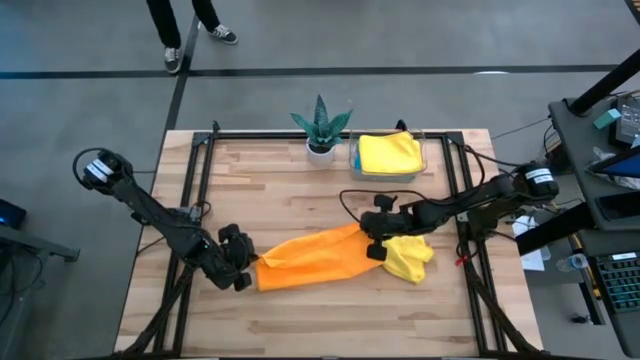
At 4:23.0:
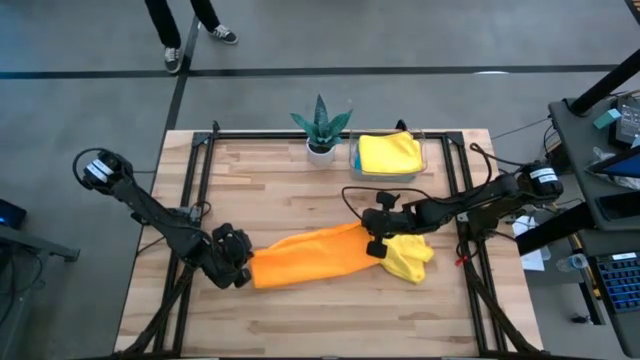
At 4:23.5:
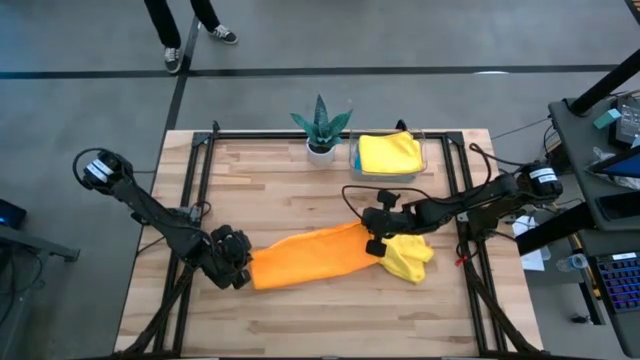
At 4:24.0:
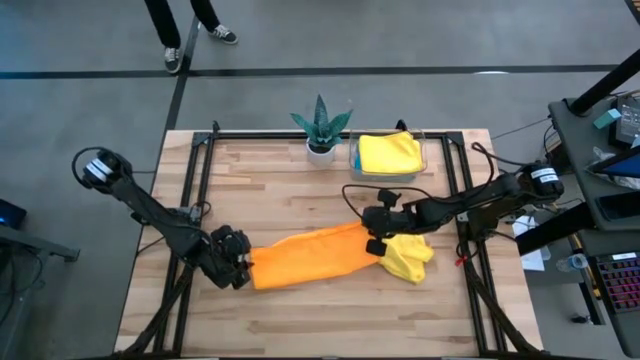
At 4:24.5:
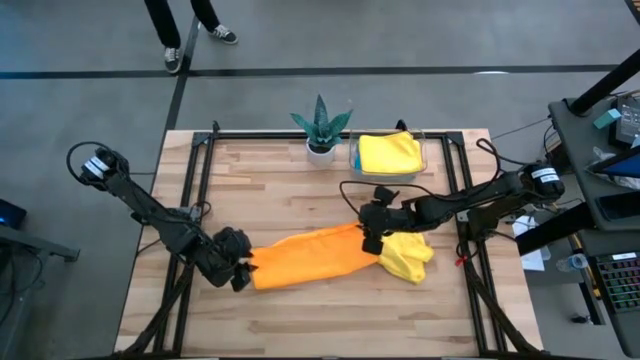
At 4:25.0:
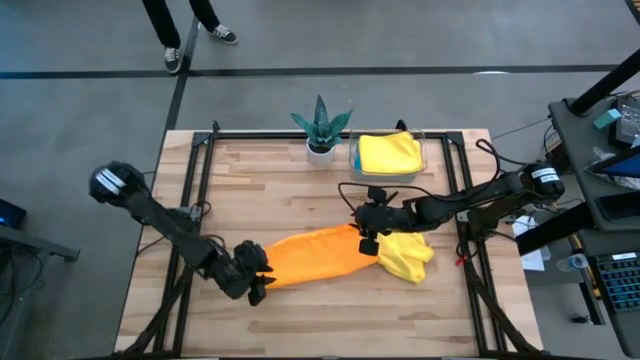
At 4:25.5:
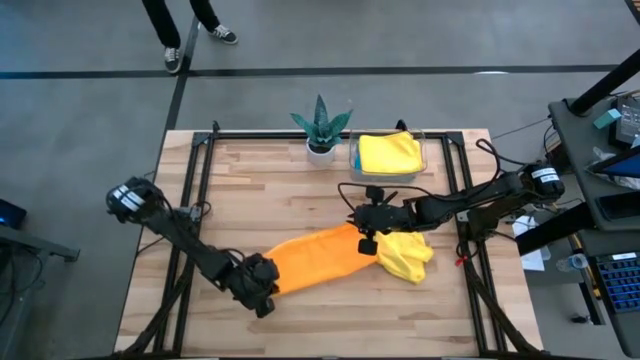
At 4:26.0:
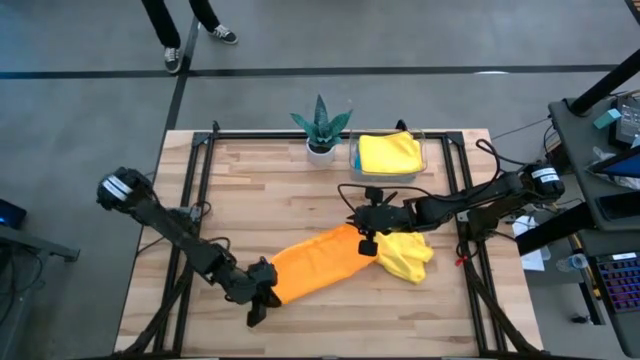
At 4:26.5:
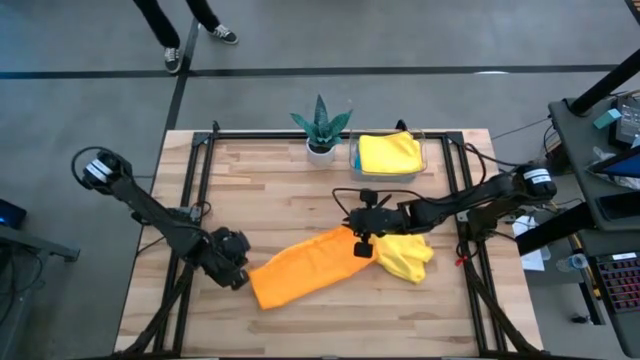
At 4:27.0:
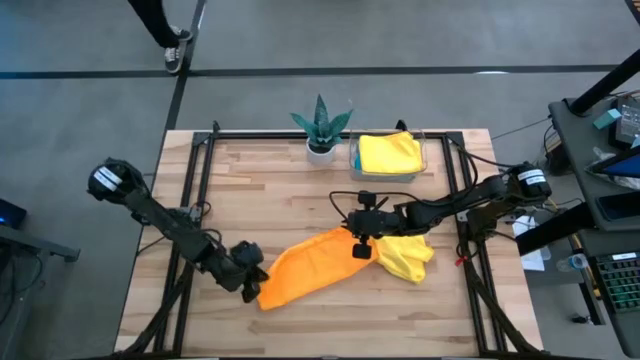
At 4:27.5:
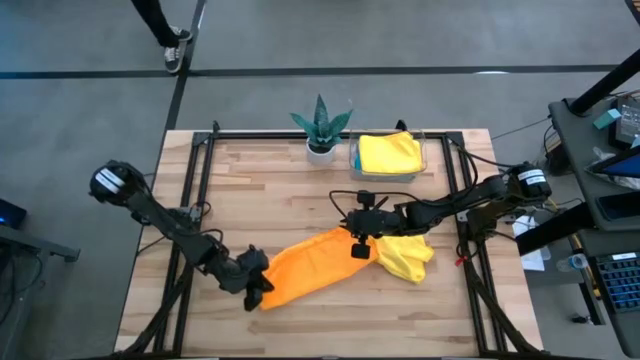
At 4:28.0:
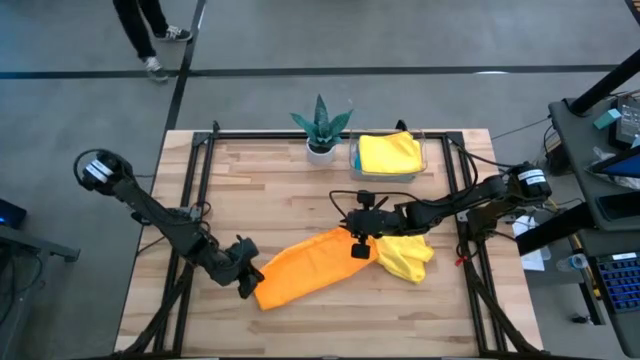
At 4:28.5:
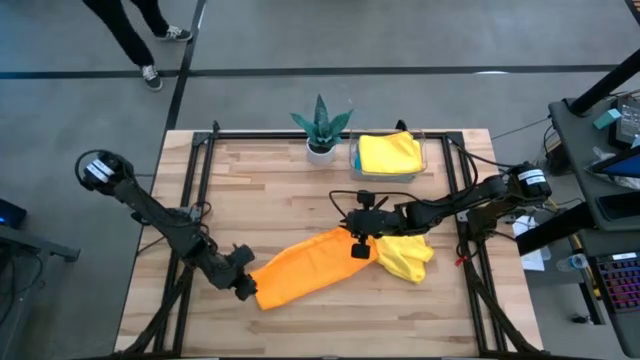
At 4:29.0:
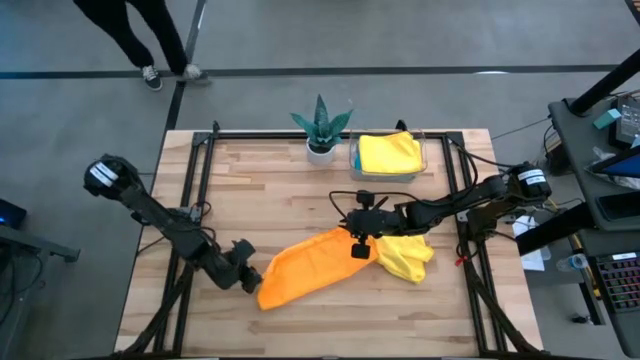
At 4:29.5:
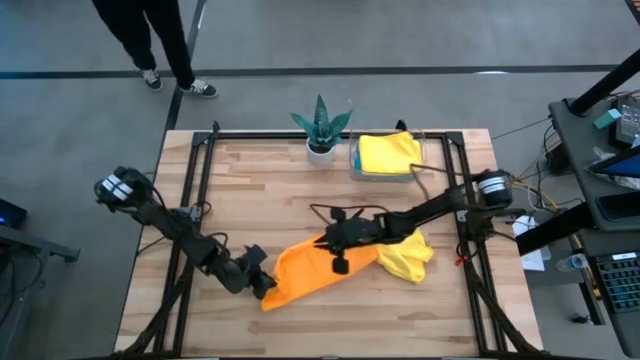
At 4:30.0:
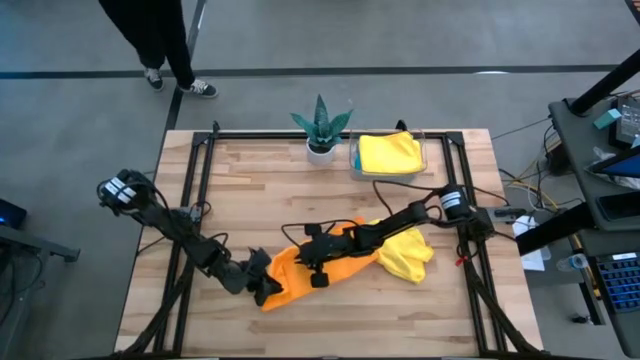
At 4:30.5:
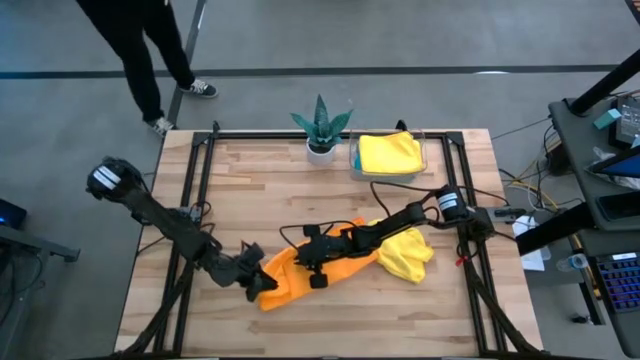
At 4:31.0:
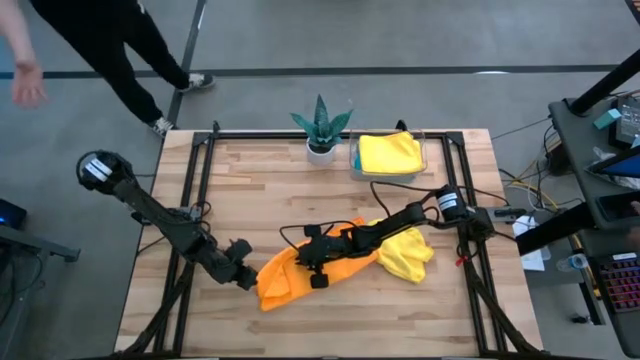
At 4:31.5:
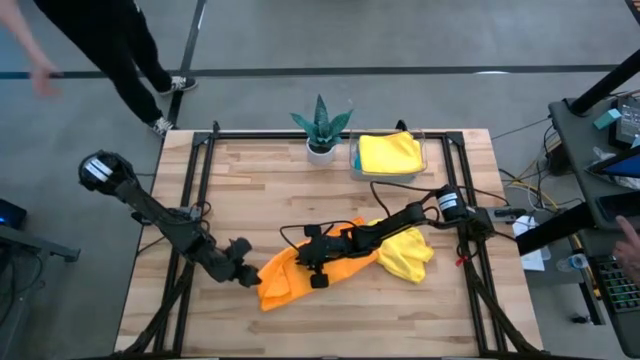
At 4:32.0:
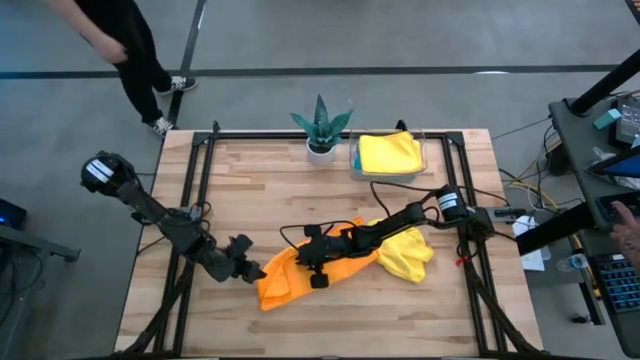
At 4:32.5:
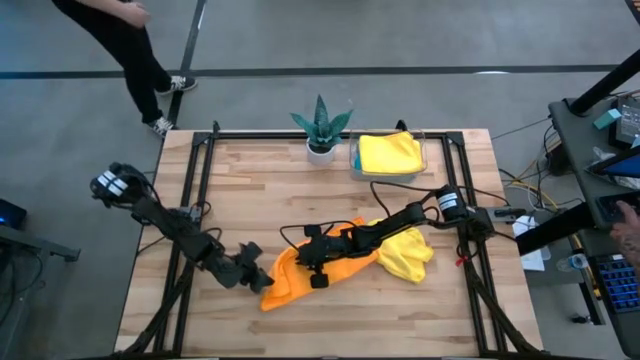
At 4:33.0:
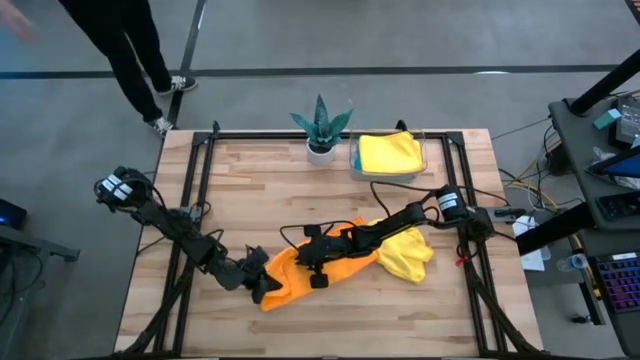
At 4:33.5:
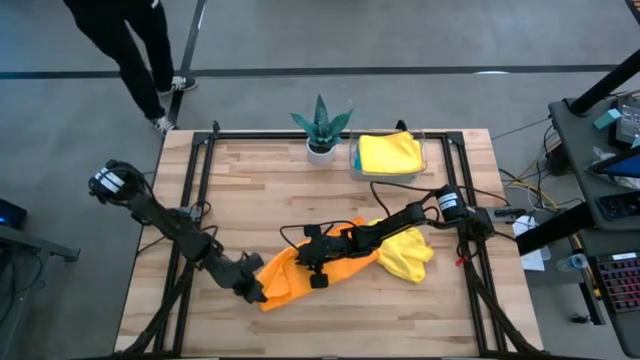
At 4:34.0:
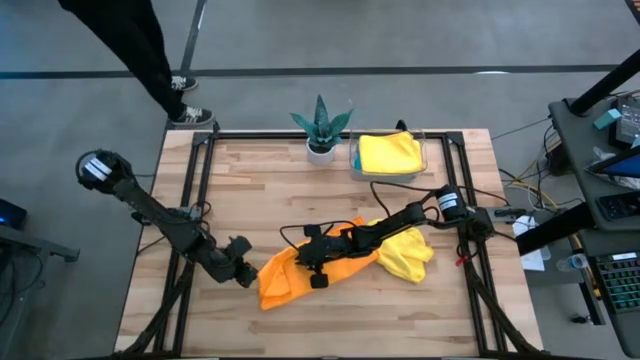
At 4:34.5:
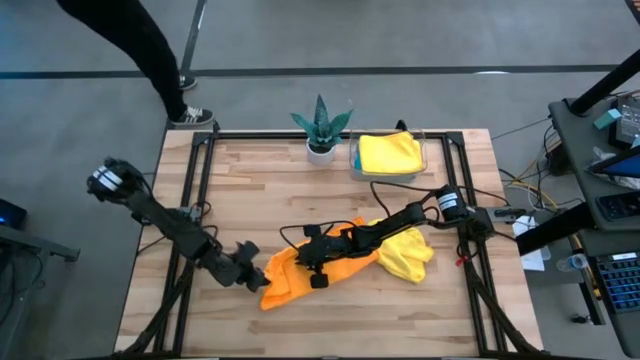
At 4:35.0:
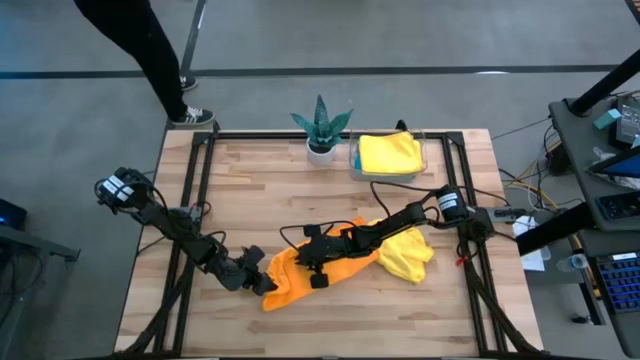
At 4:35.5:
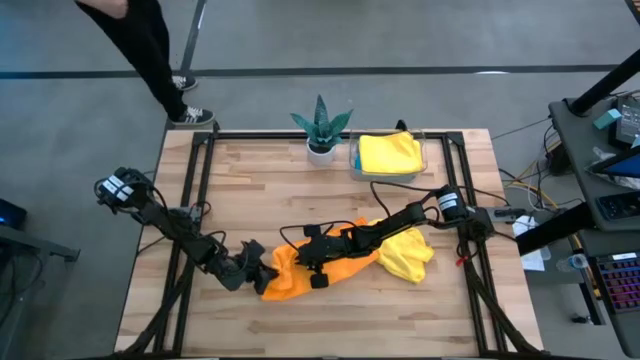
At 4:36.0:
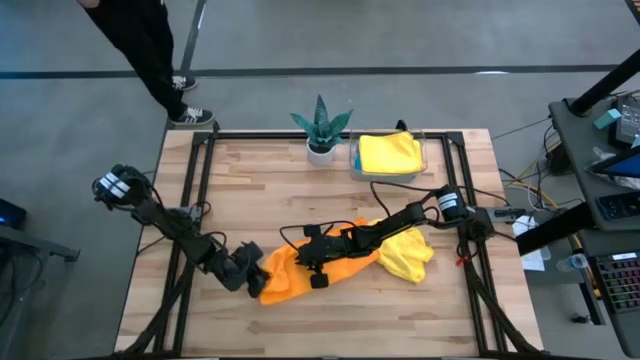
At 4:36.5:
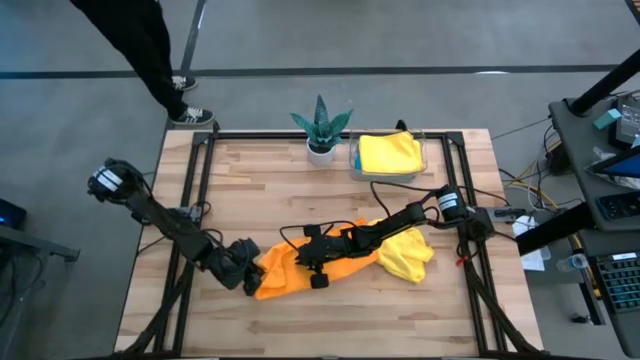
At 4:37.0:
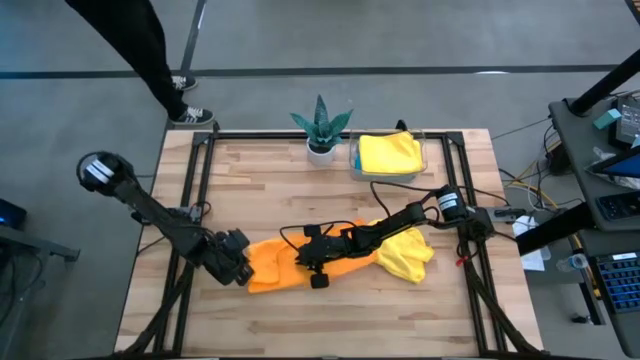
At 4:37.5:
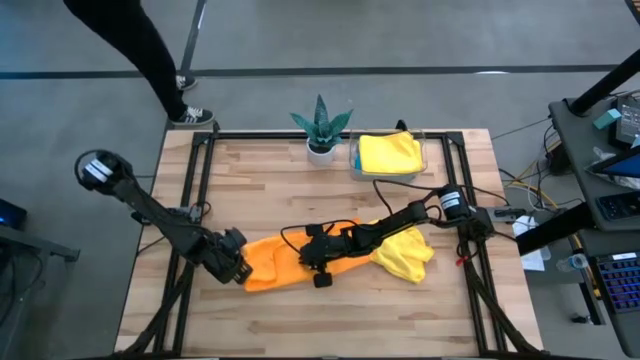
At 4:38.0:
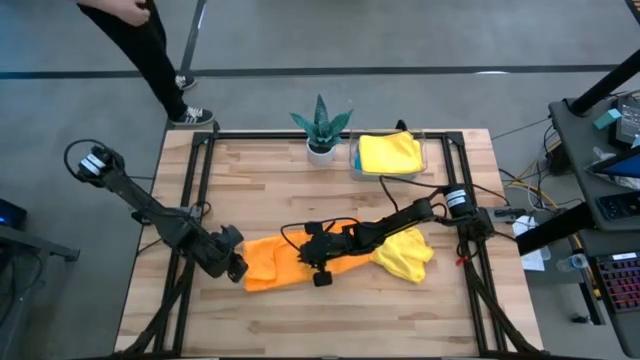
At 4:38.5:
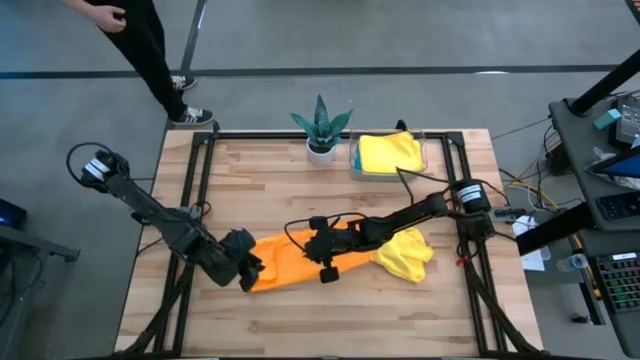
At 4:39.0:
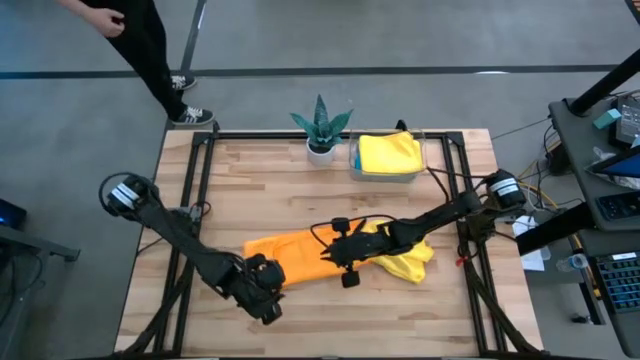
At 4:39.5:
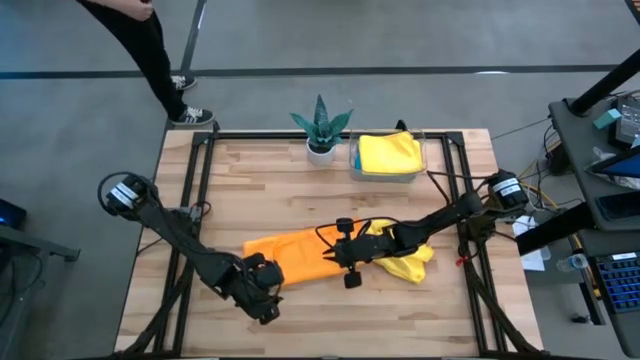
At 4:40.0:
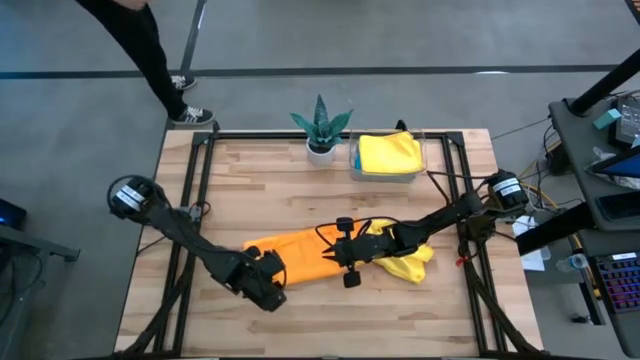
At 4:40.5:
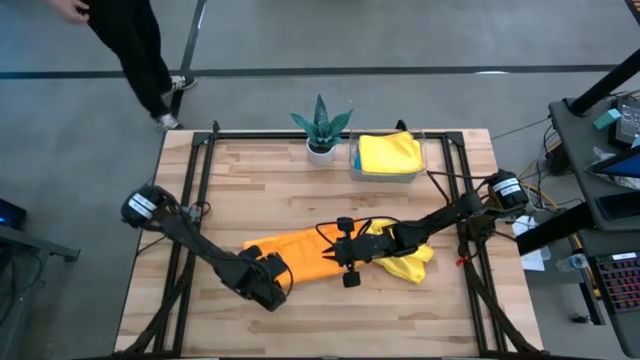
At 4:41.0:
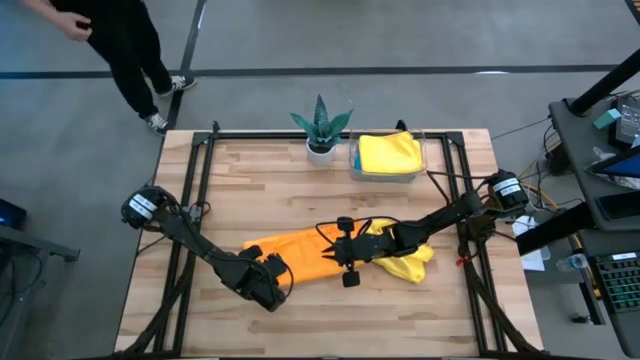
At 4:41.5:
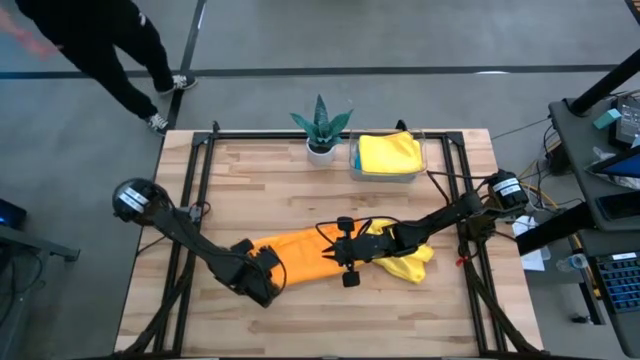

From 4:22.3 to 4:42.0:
Task: Fold microfiber towels
Fold the orange microfiber towel
